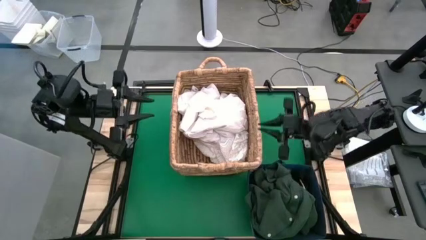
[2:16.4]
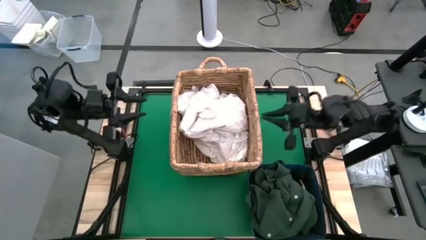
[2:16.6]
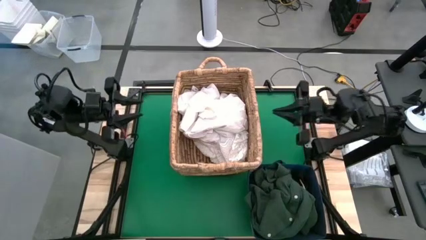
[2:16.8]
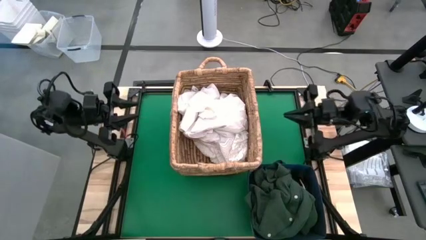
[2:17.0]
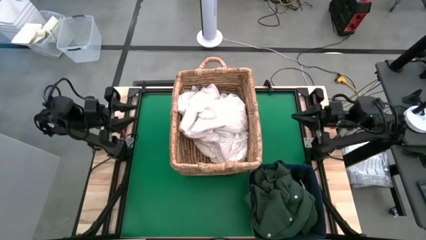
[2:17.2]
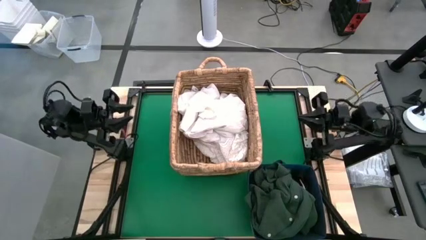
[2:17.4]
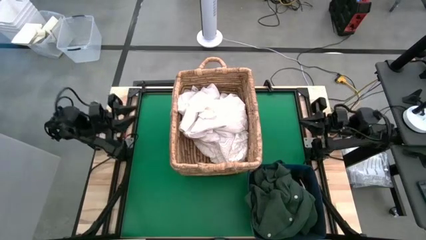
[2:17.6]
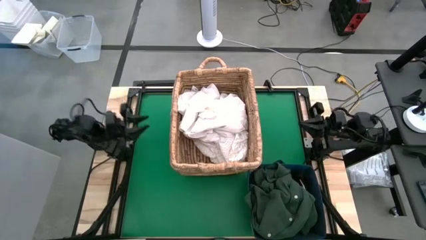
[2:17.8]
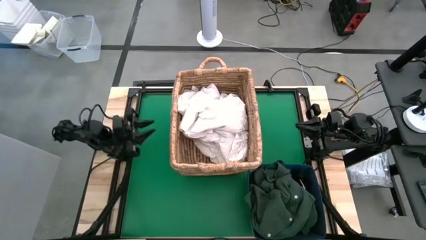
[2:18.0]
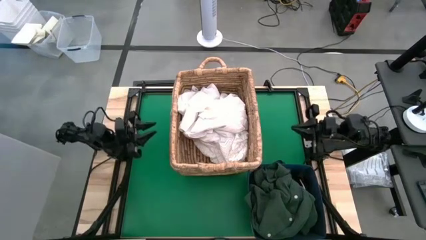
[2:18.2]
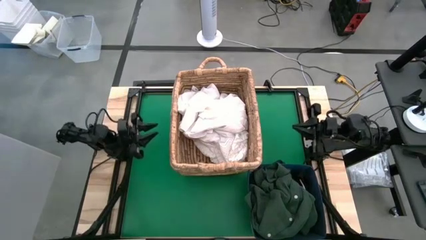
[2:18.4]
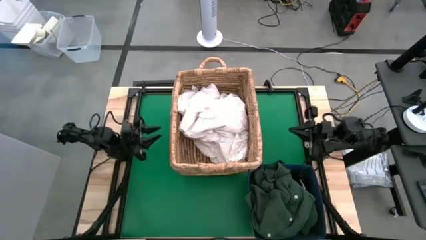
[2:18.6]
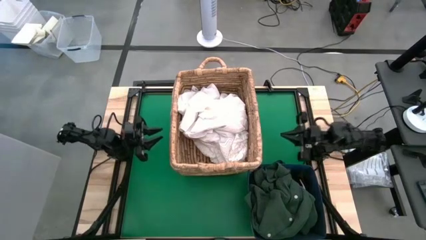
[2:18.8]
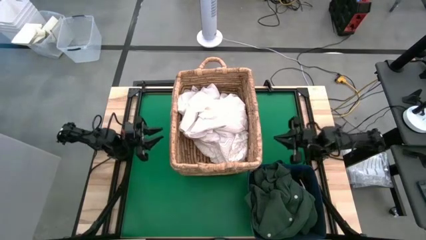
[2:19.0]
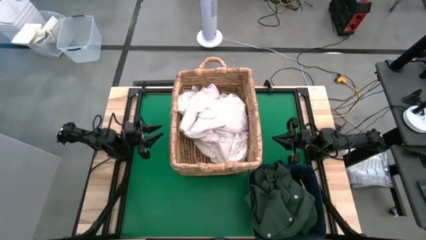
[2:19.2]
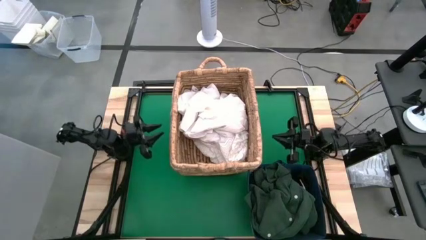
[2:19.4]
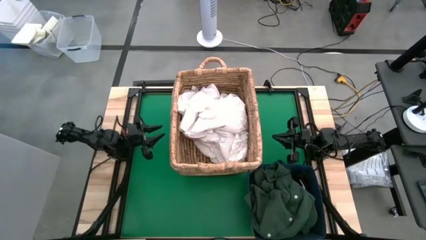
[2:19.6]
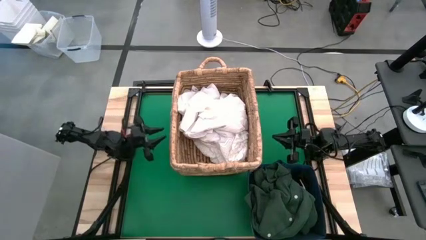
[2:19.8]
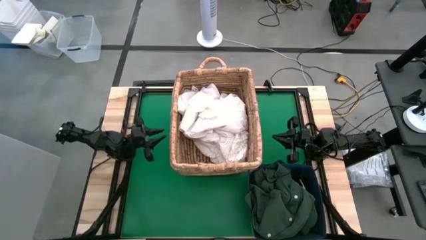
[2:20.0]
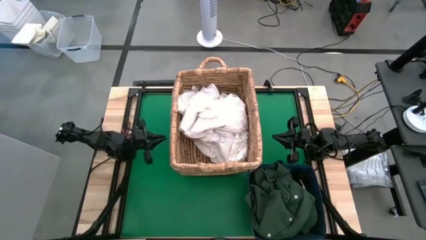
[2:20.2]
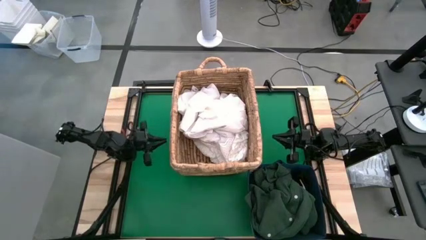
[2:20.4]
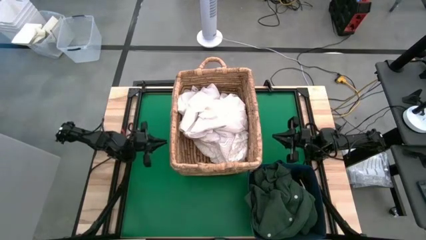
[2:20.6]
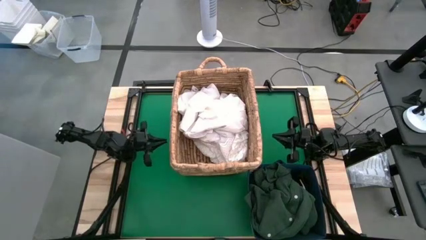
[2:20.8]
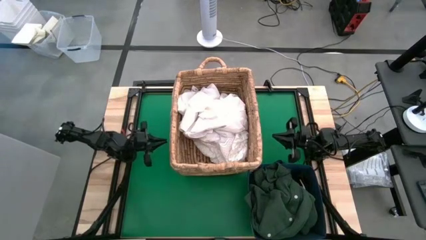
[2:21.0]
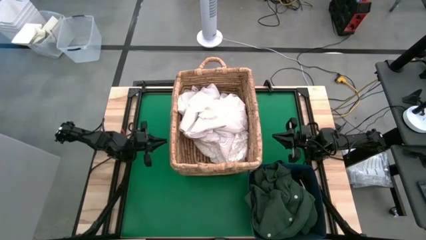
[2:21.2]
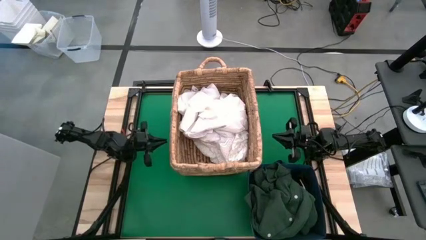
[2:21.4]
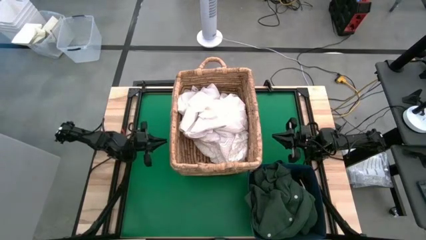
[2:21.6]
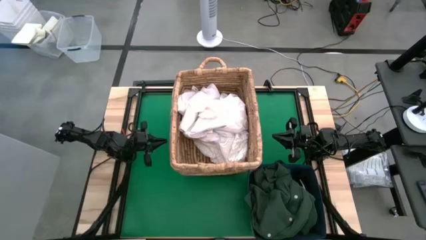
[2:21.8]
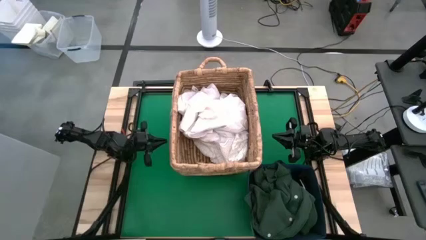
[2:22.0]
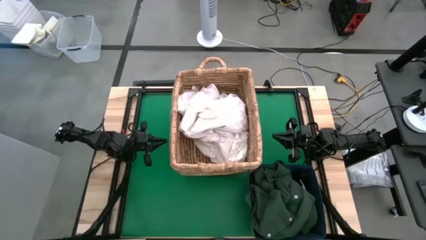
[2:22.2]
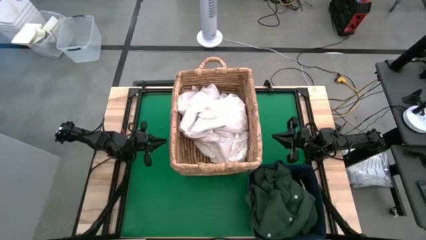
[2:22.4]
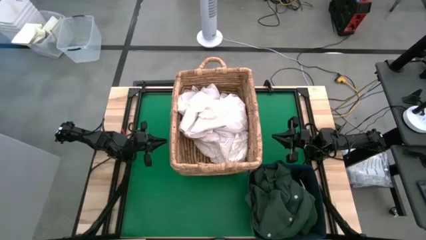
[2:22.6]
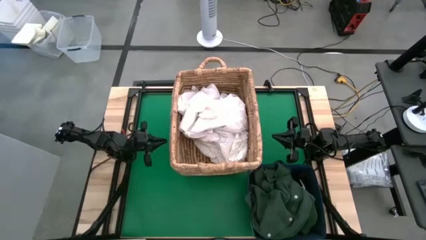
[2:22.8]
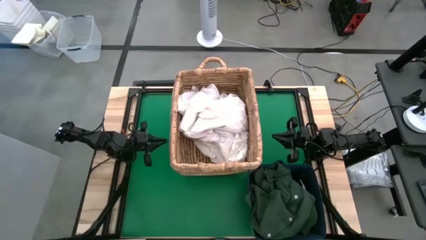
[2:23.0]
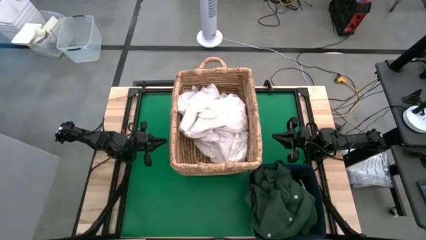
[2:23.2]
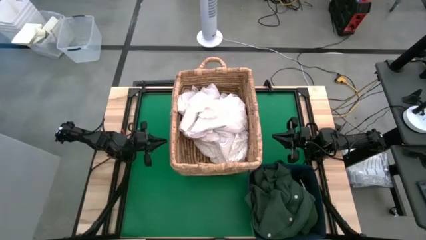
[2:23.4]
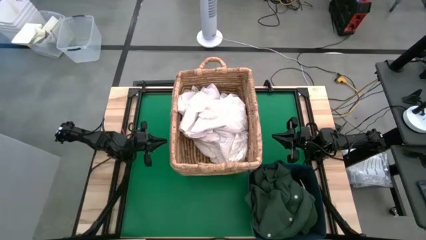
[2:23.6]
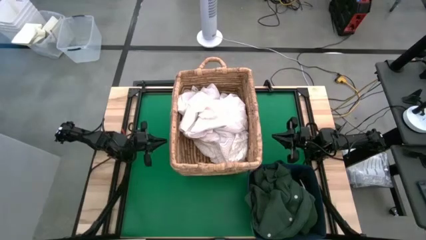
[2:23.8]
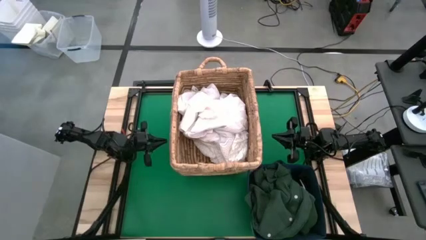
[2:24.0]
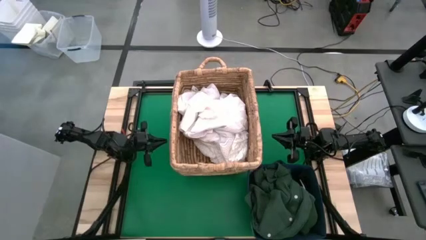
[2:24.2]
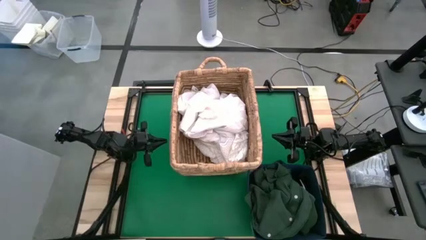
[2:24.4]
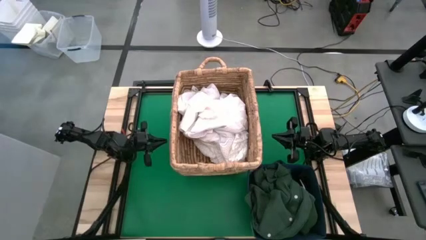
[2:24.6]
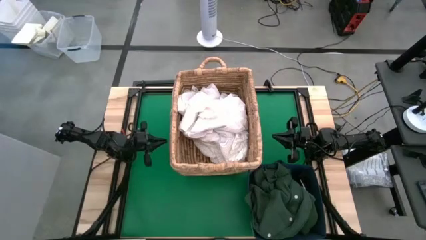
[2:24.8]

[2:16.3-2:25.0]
Return to Home Position

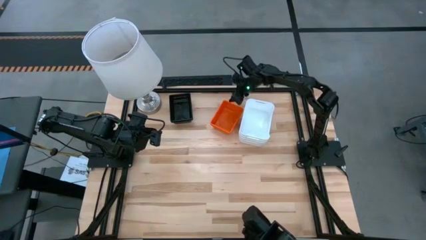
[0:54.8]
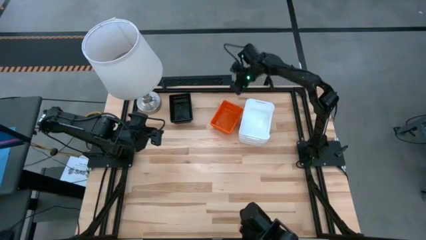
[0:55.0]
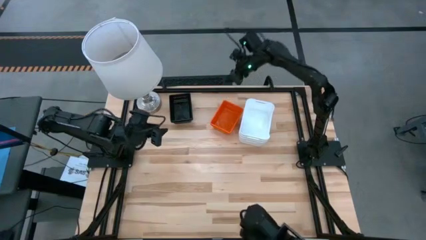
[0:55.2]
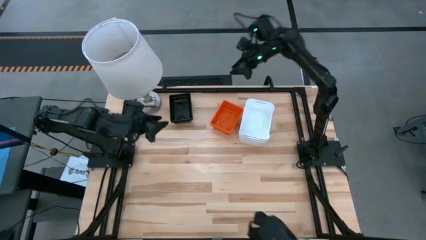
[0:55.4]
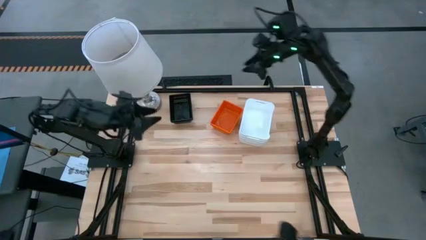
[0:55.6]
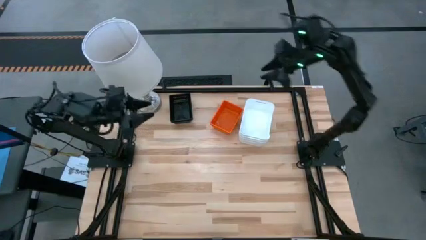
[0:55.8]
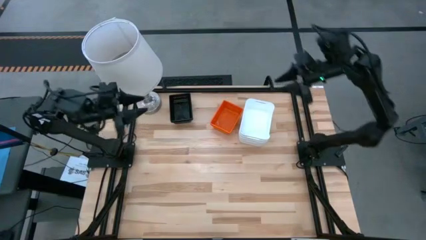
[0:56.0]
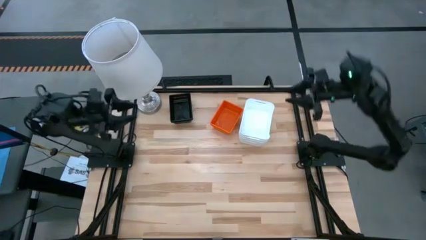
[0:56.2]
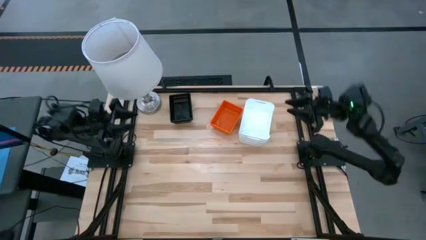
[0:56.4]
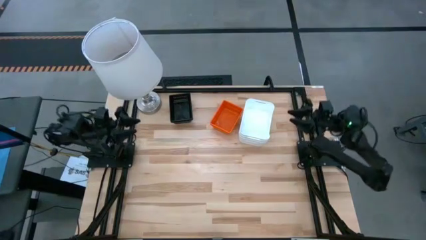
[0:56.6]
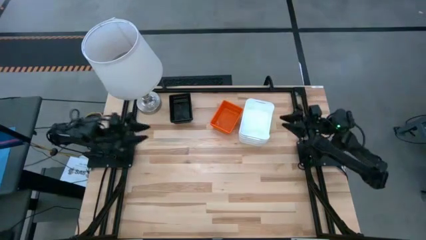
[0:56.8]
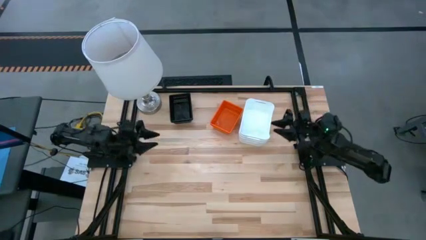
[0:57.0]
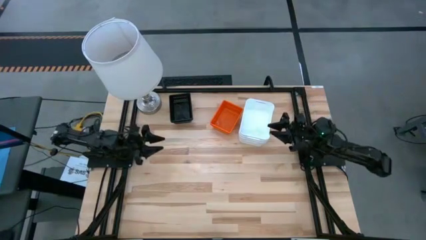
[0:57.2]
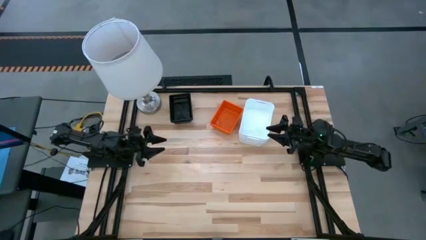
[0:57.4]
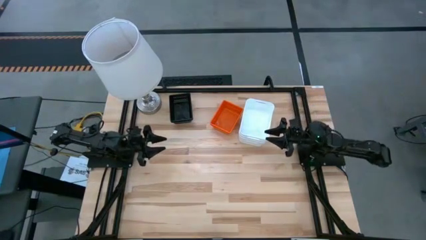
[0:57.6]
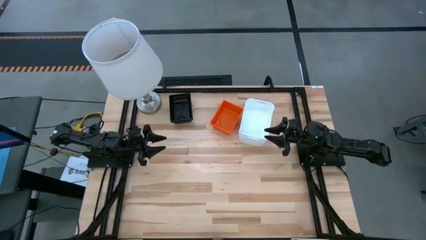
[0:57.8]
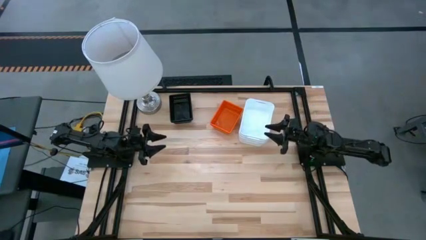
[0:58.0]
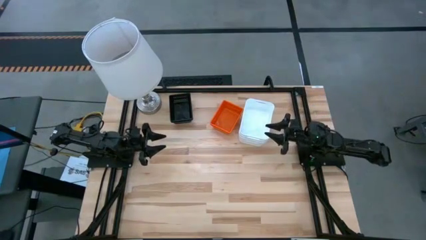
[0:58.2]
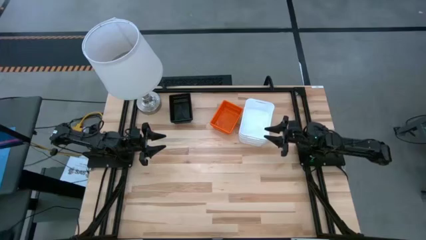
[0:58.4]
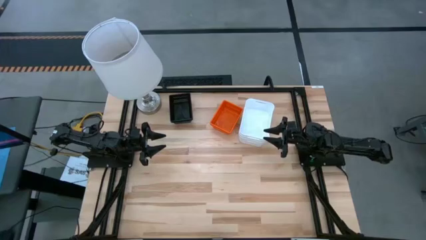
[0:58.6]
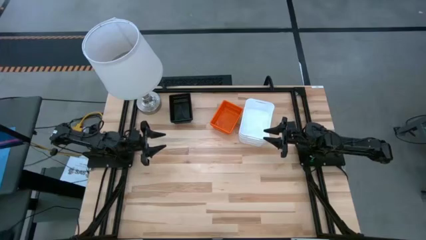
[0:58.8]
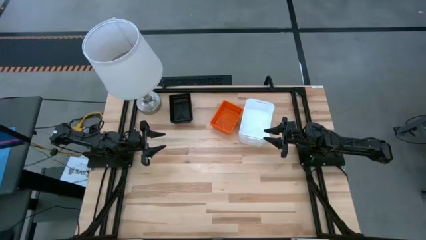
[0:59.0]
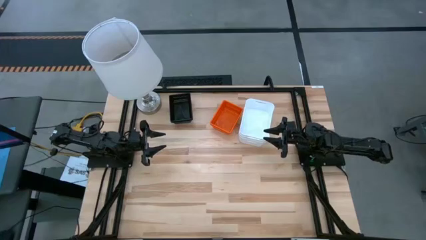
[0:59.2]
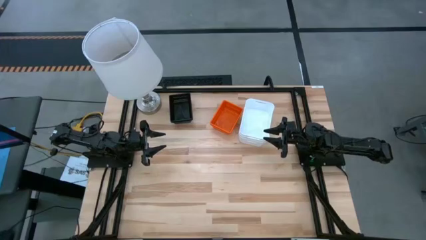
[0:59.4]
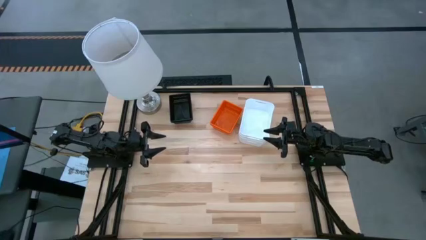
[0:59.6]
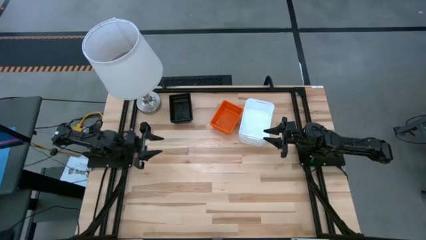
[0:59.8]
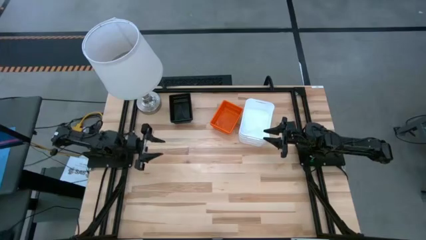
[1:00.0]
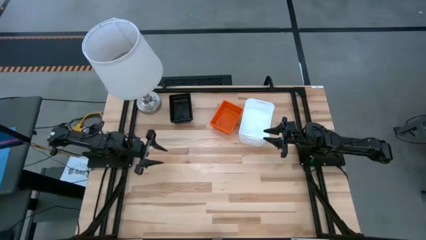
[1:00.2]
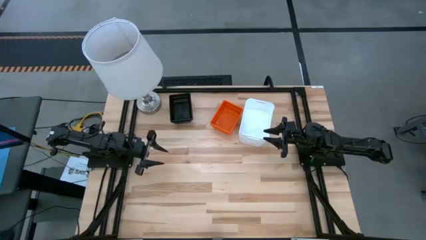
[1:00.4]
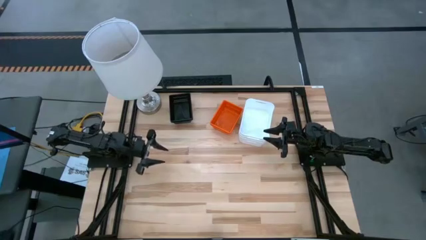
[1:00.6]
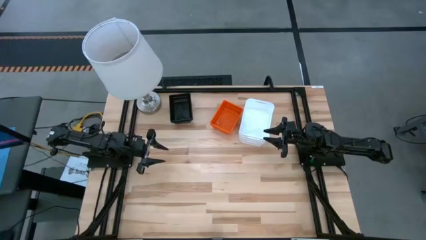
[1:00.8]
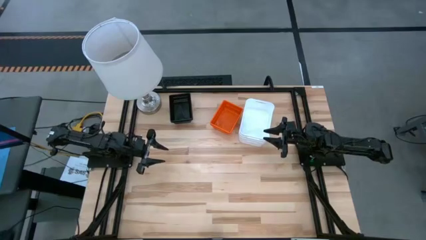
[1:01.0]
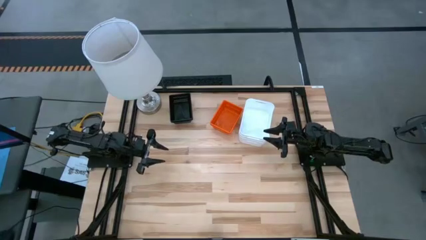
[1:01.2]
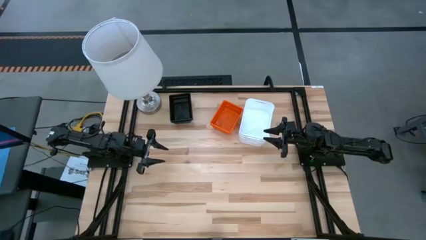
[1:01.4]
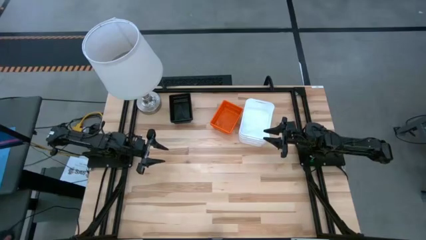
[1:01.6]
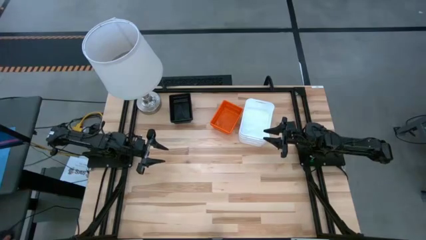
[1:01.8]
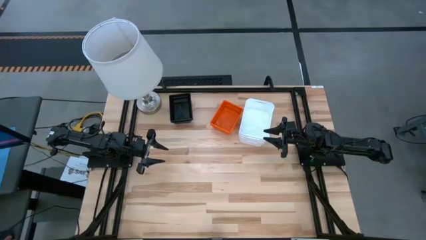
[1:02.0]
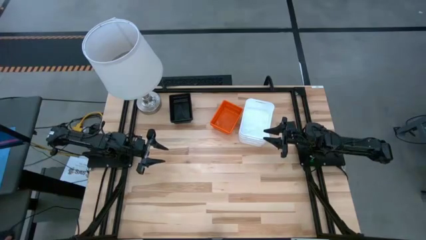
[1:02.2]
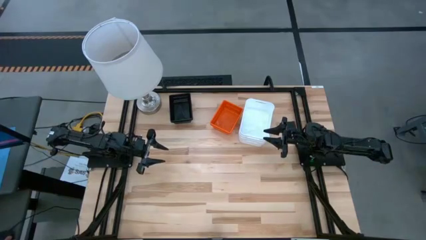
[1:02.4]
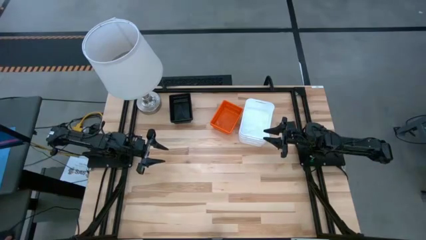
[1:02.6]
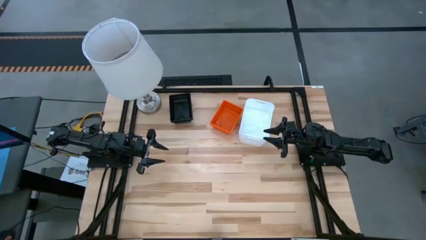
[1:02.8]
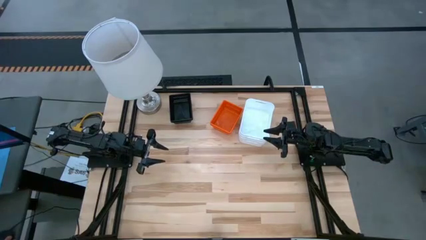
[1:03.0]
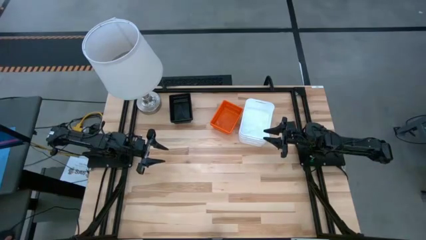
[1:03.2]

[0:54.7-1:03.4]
Return to Home Position
